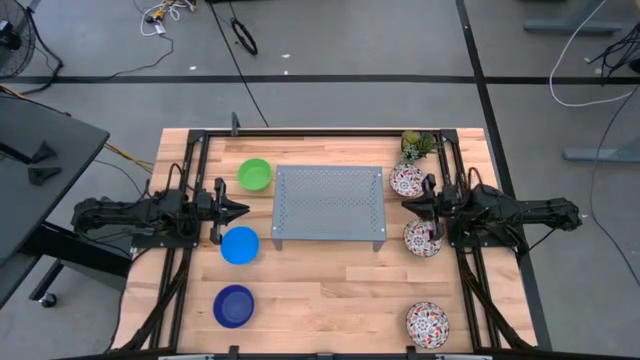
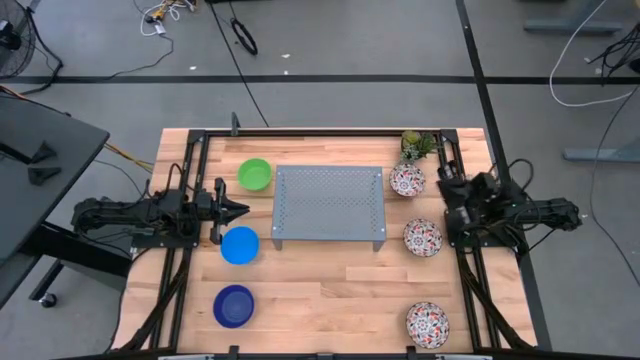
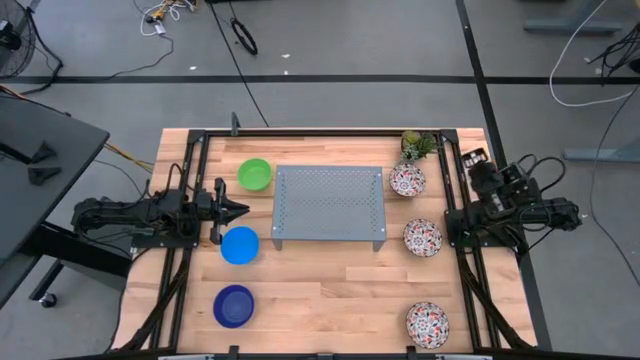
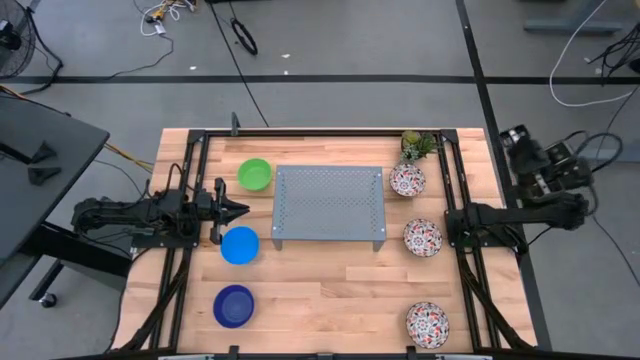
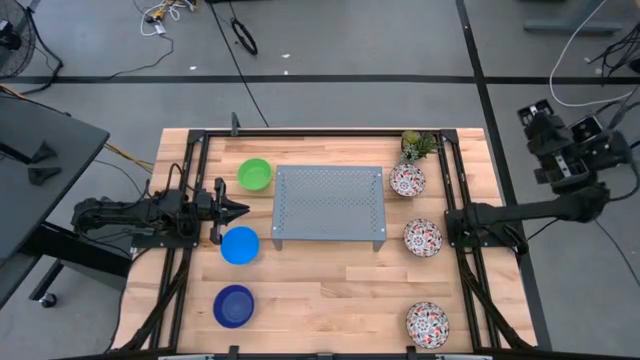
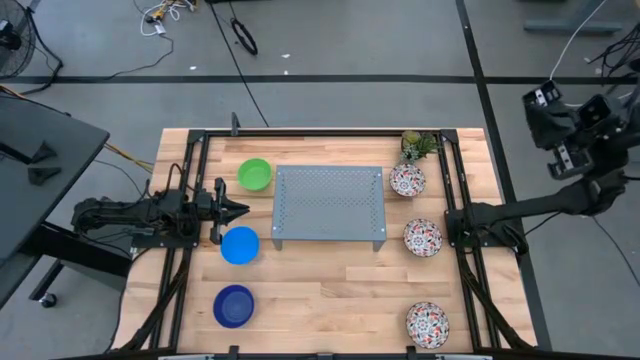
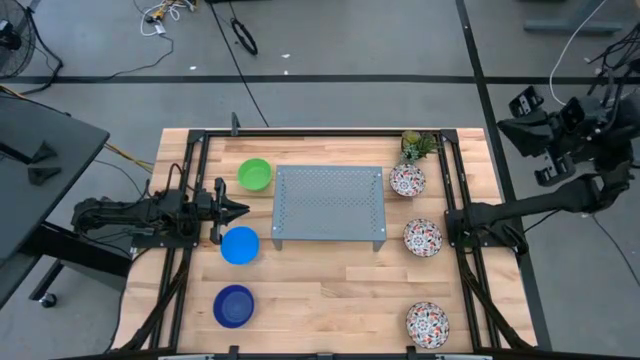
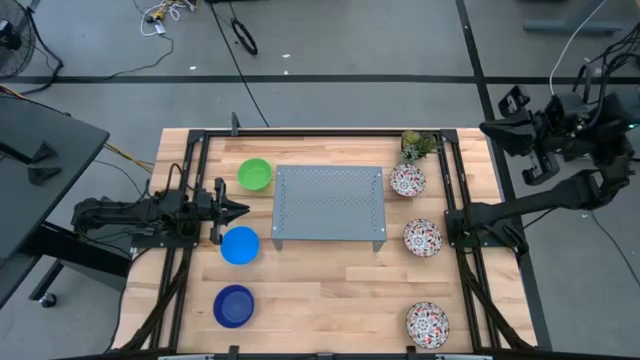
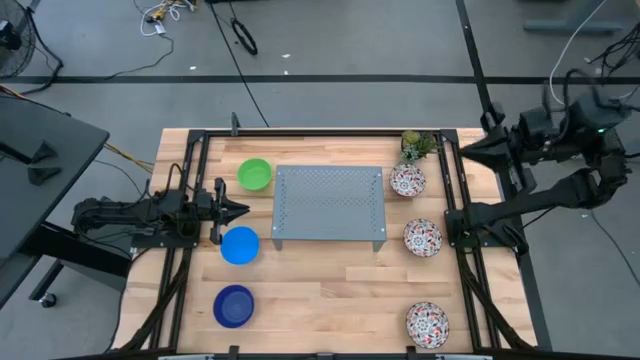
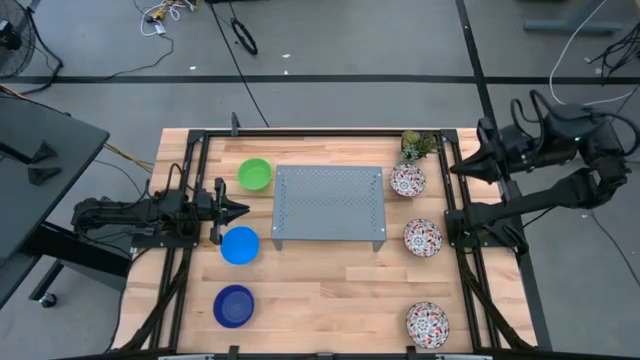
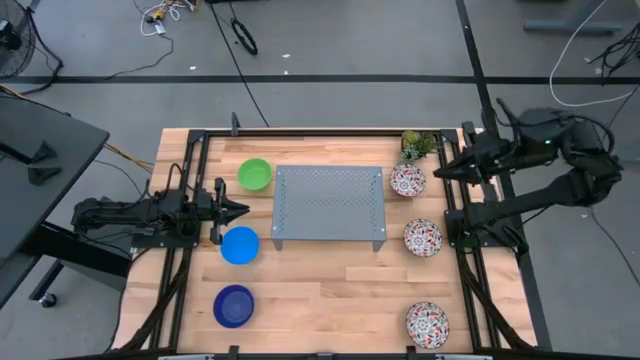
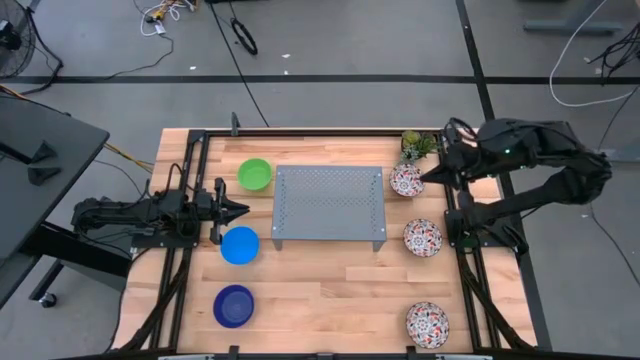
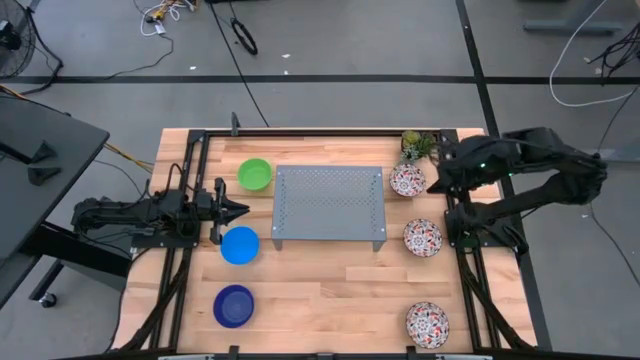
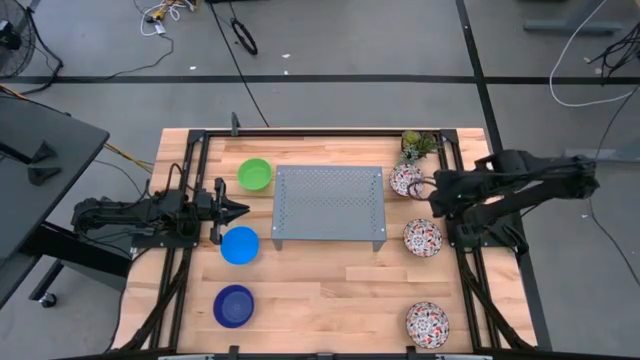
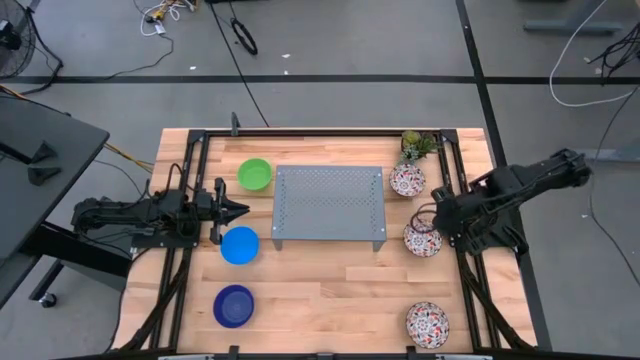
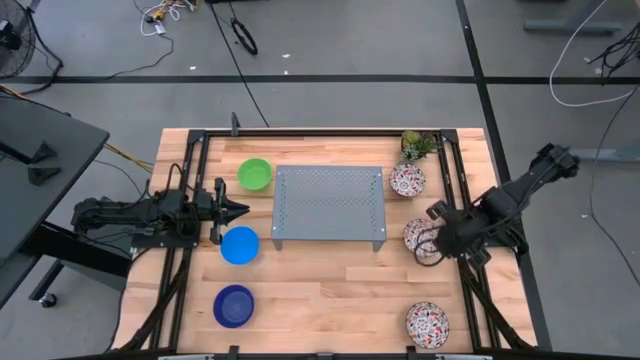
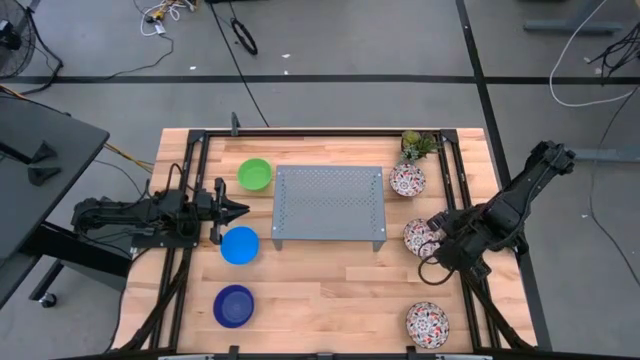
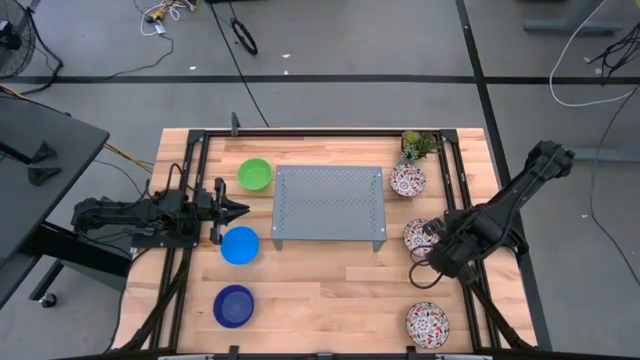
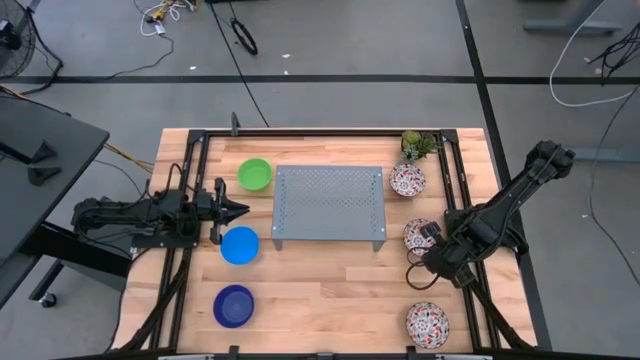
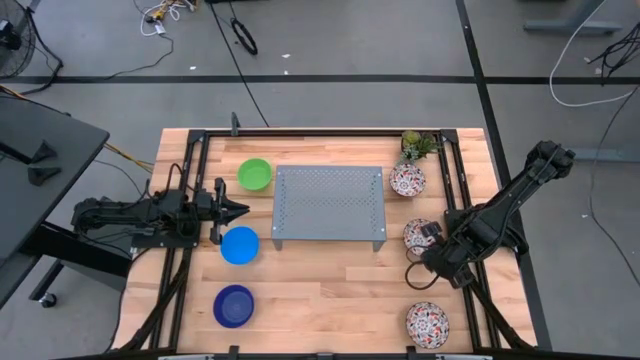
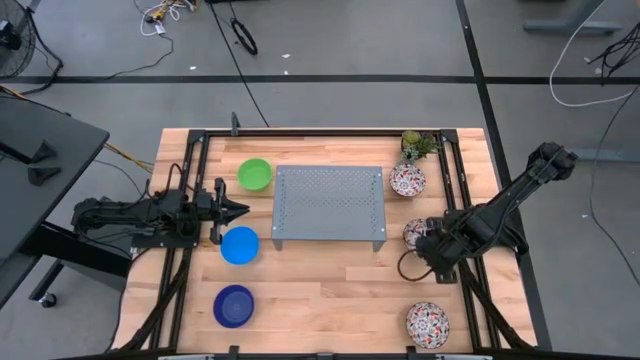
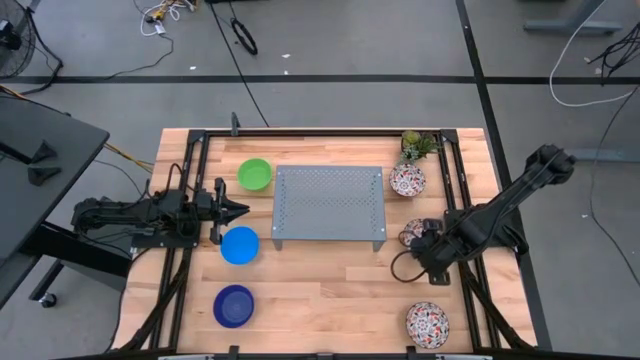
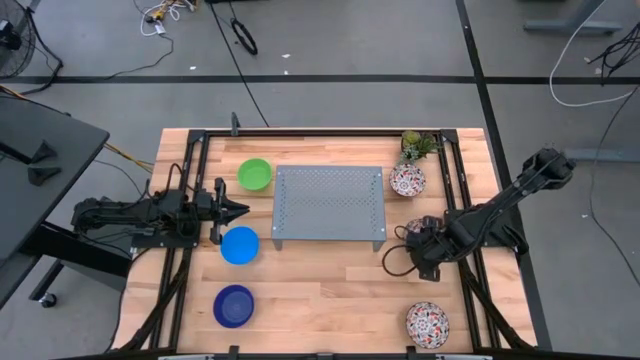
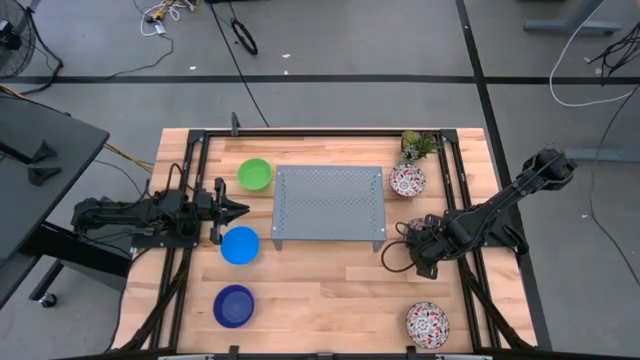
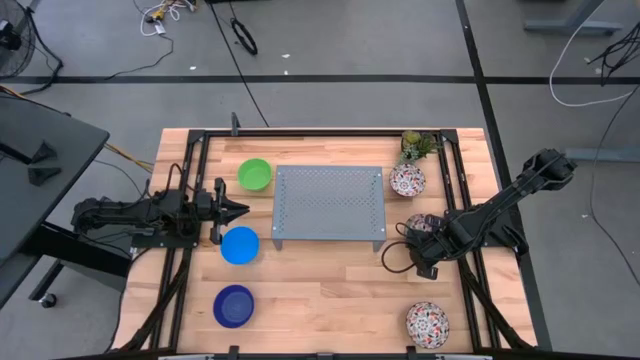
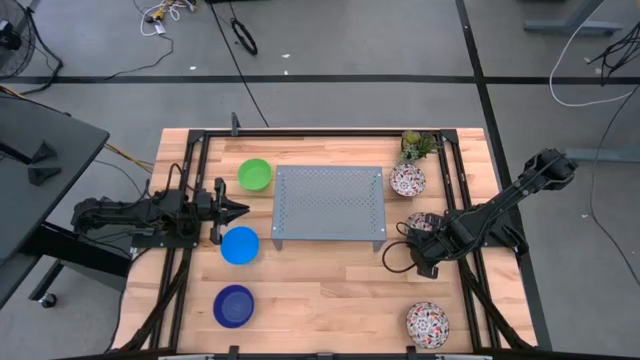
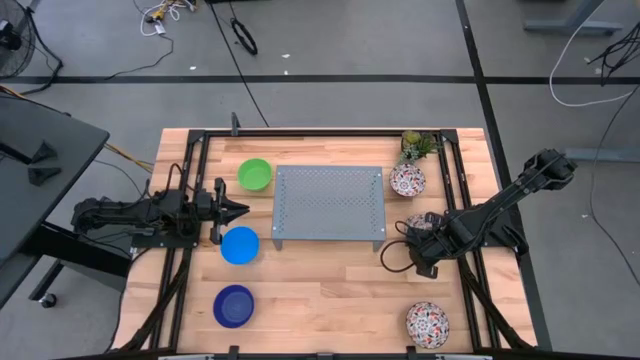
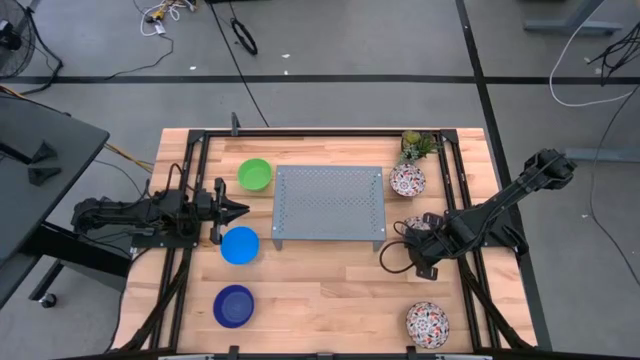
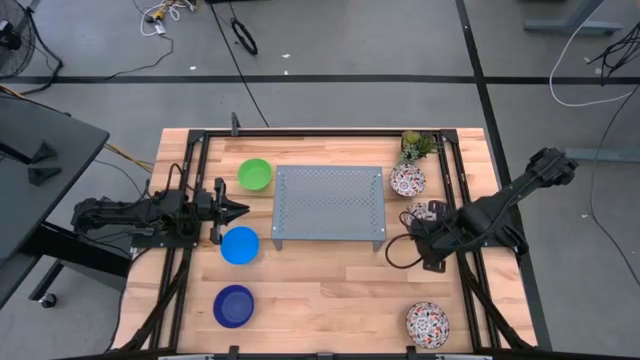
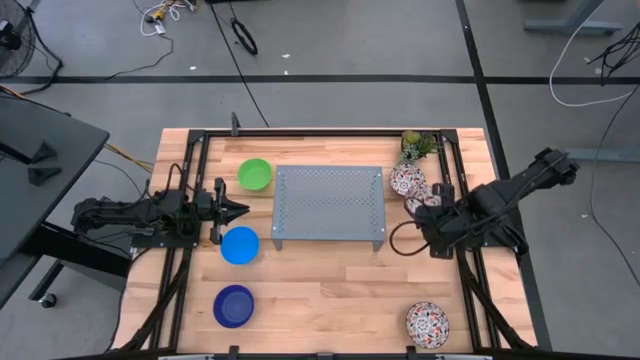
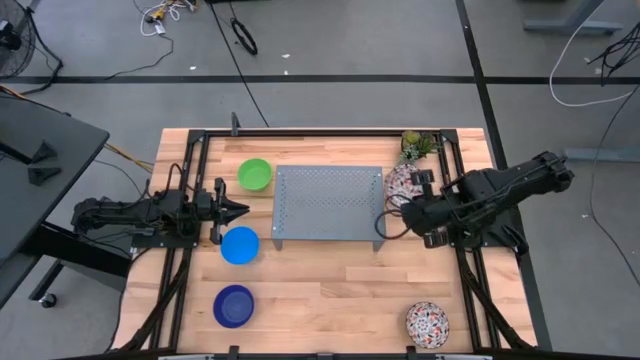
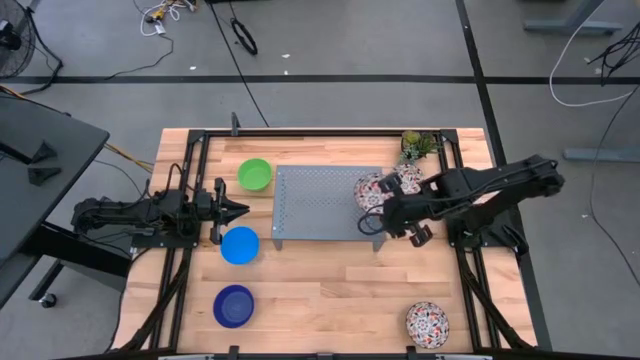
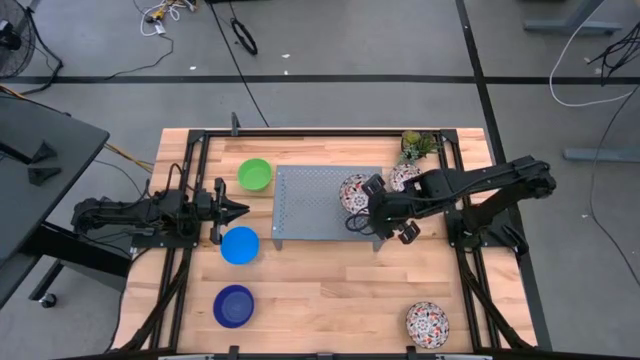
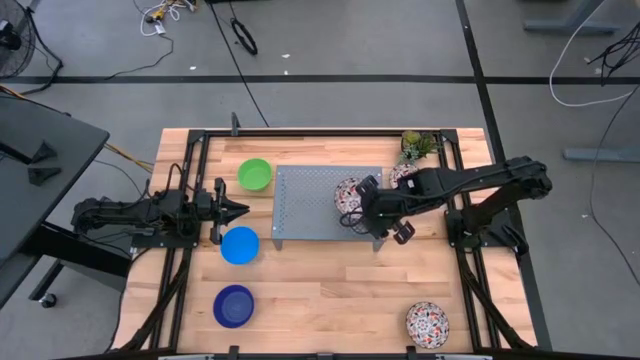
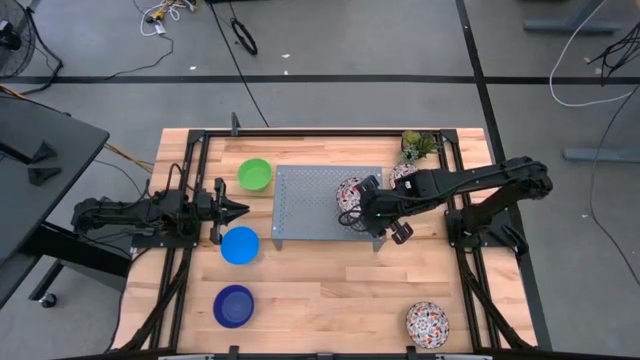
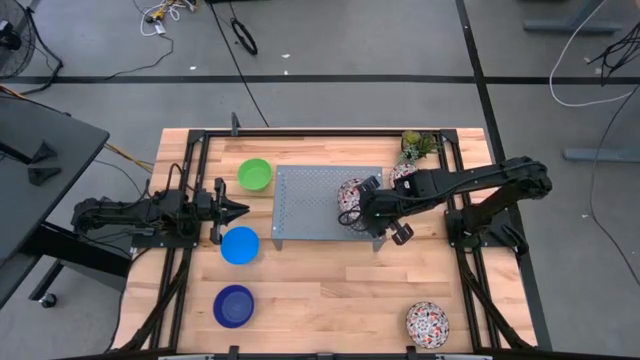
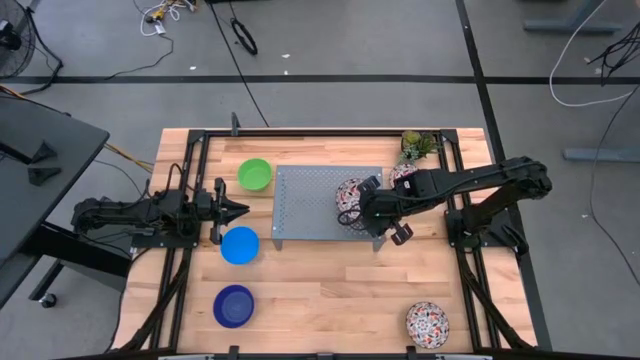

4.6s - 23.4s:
Task: Pick & Place Mini bowls
Put the middle white patterned bowl on the shelf

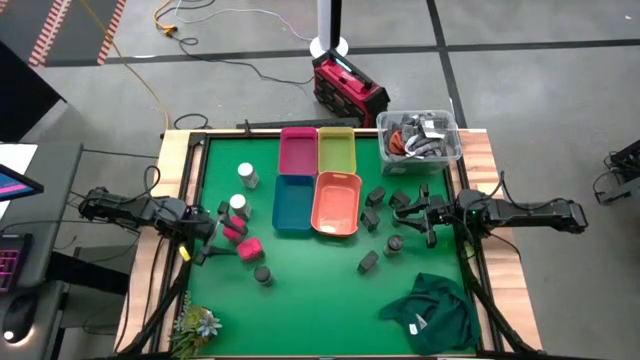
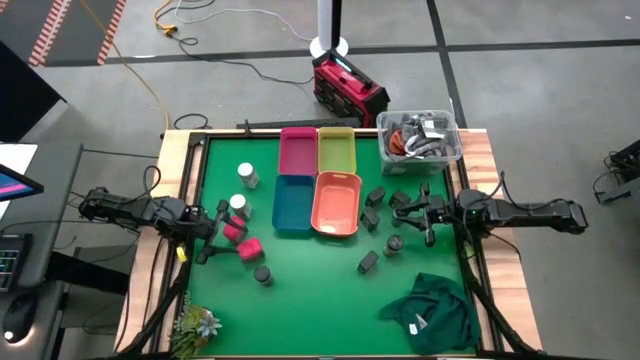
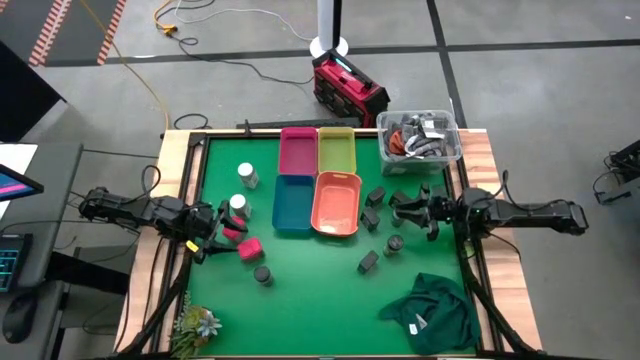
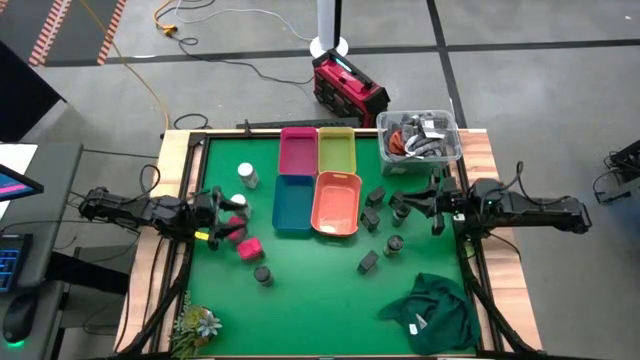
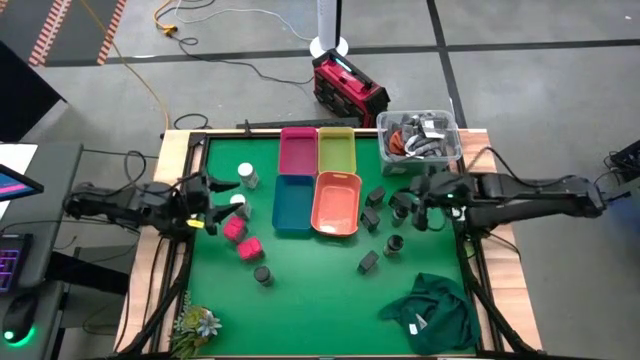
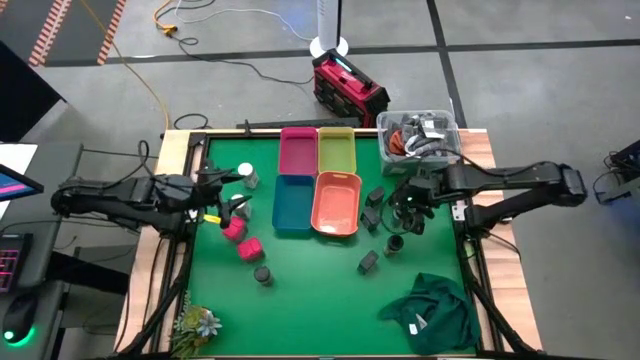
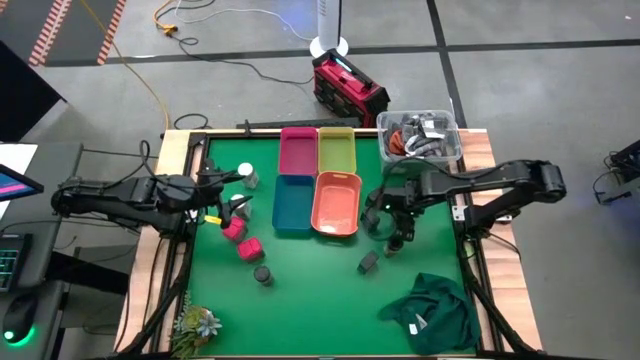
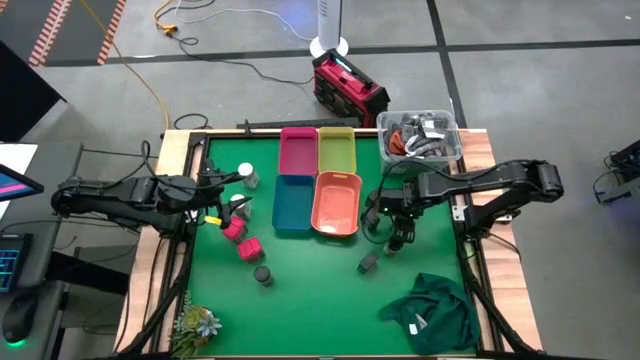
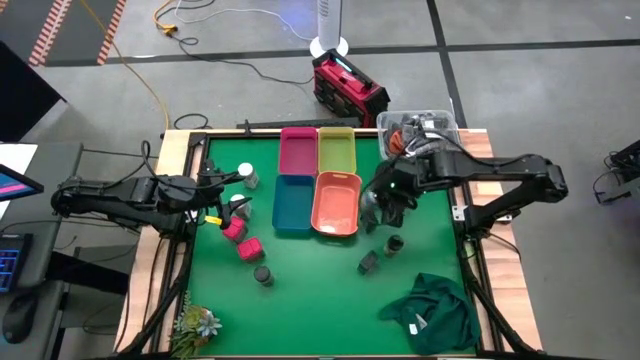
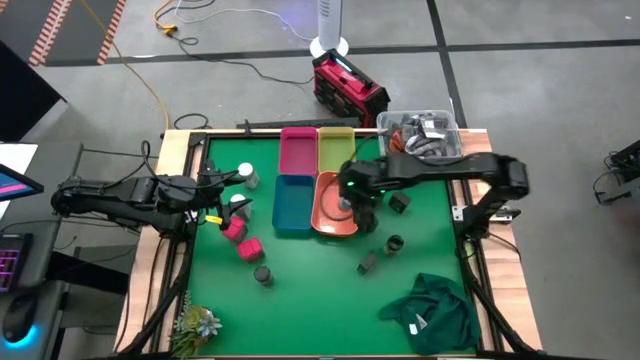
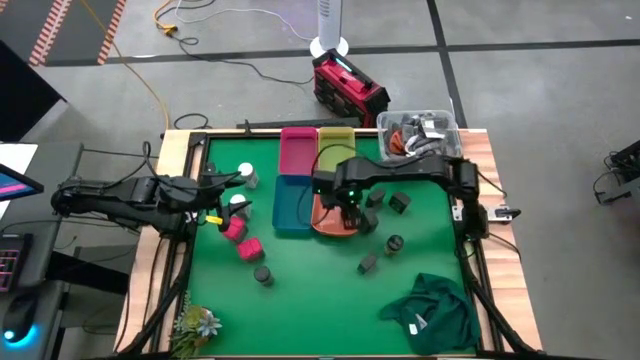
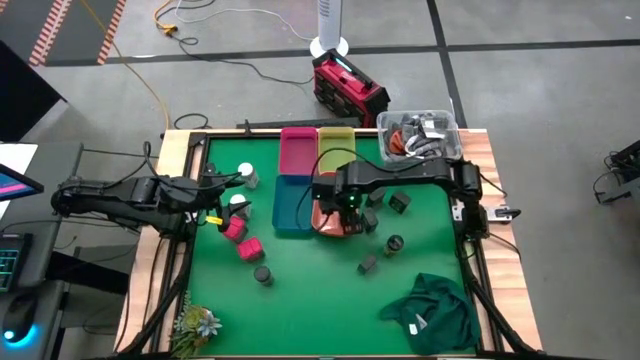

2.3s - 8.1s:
Task: Sort spices by type
Put the top right black seasoning bottle into the orange tray
